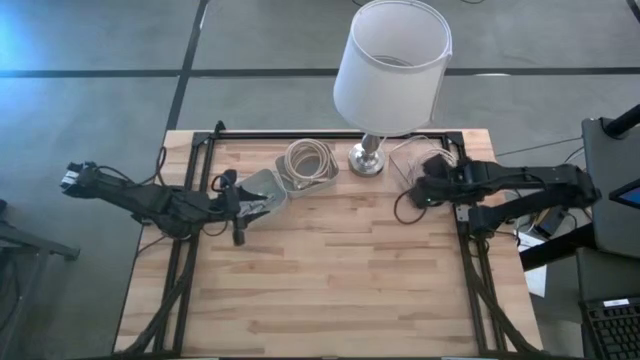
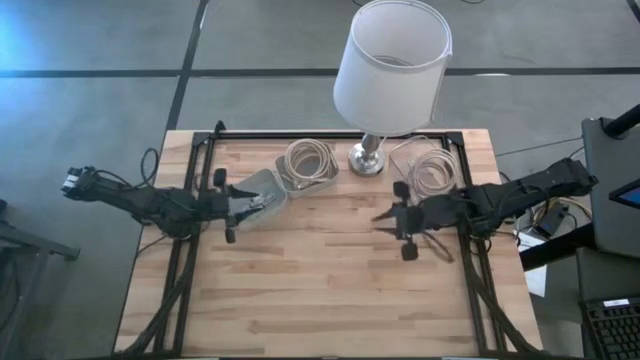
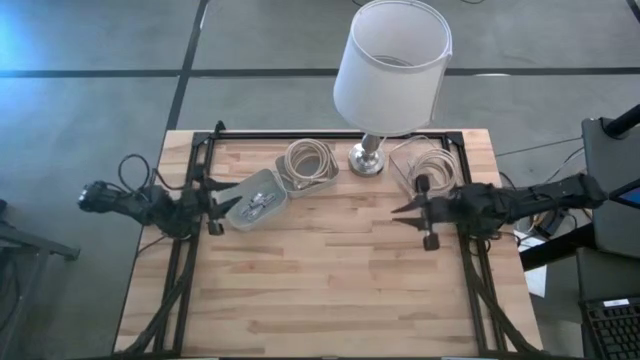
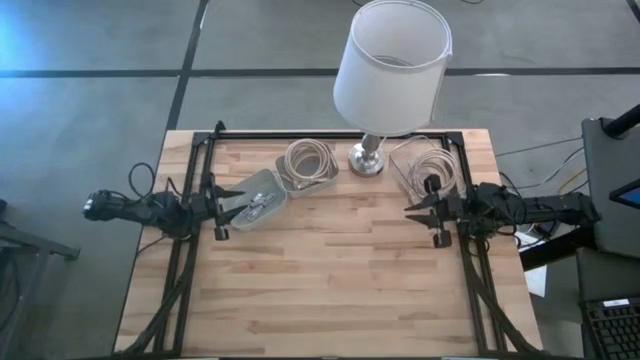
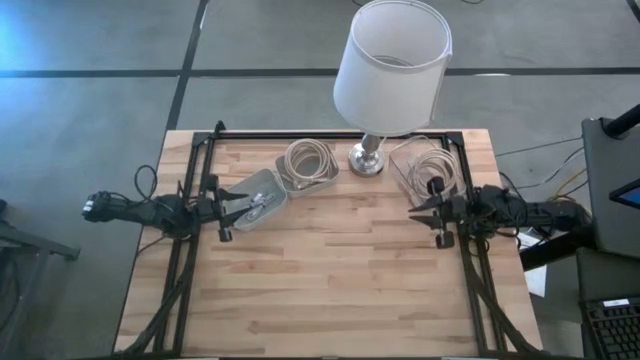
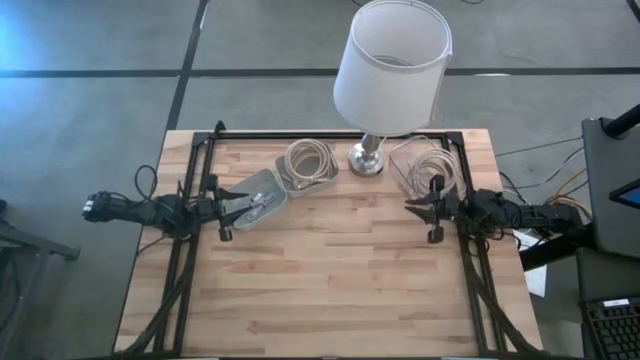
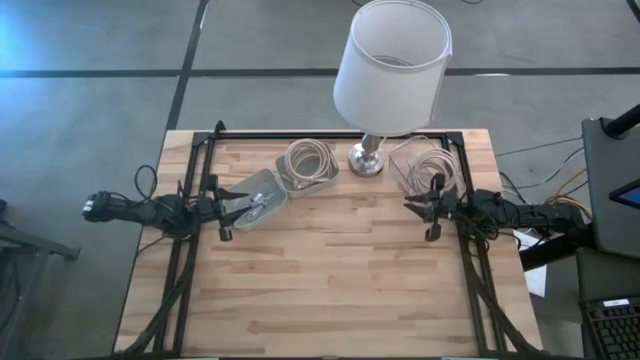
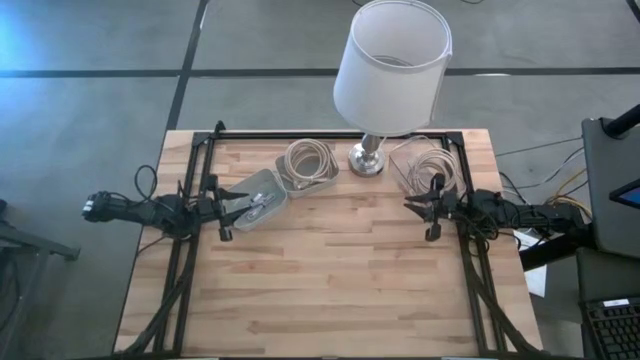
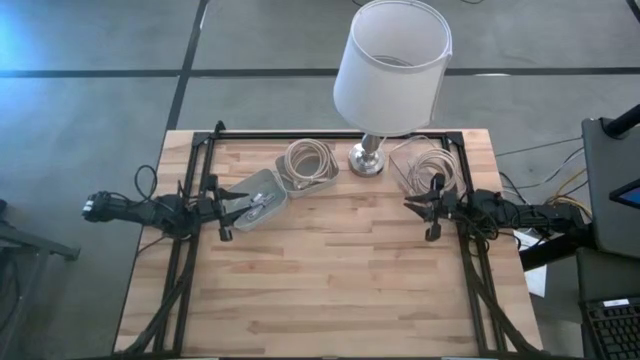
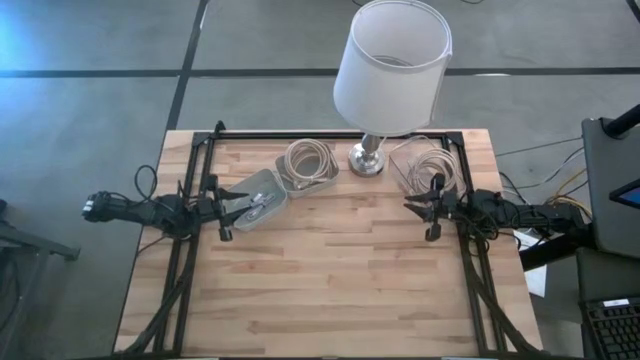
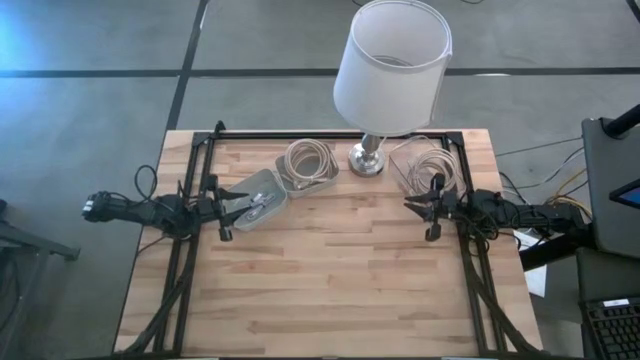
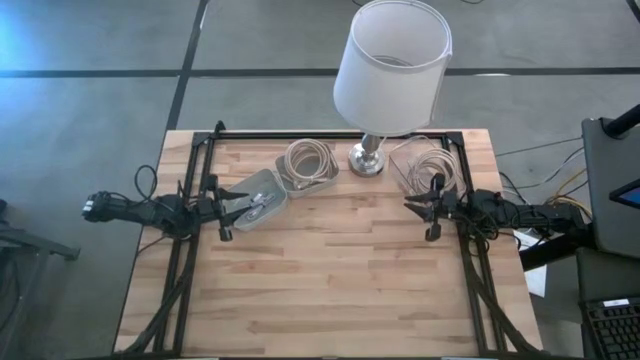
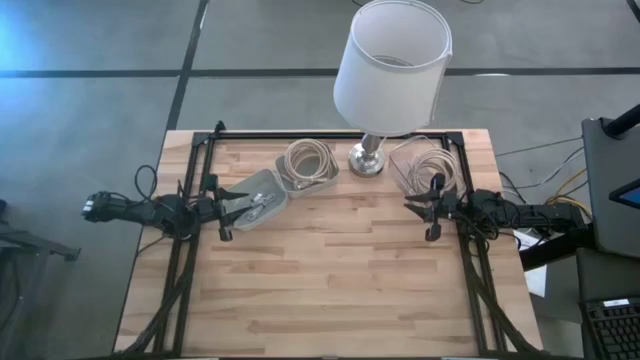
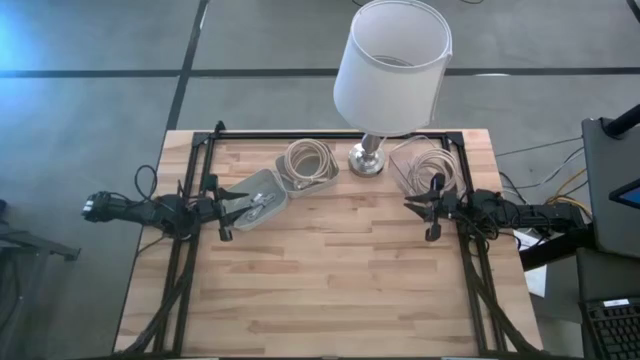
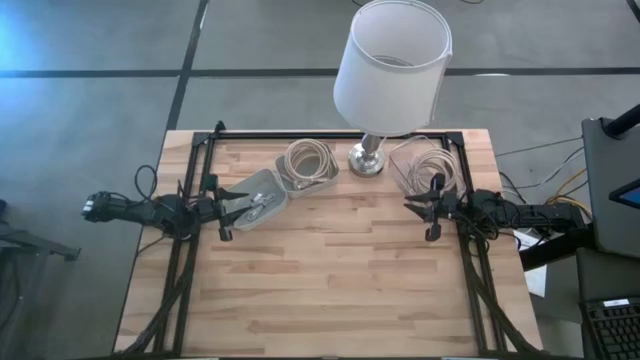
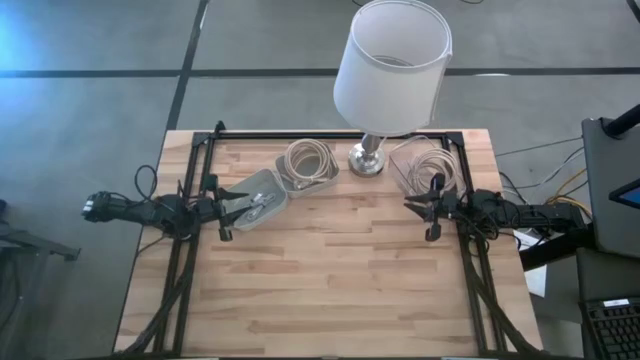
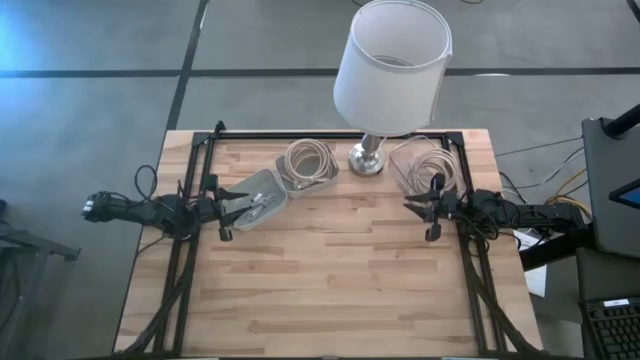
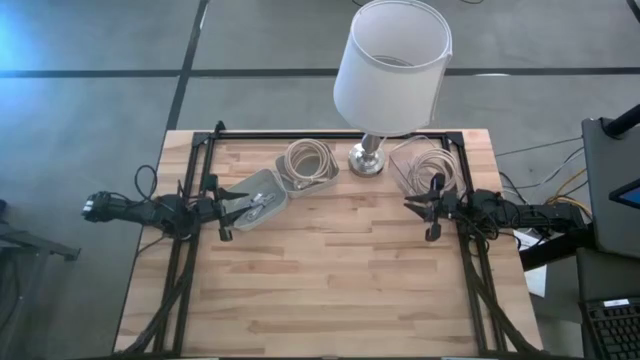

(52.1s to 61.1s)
Task: Pick & Place USB Port
Return to Home Position

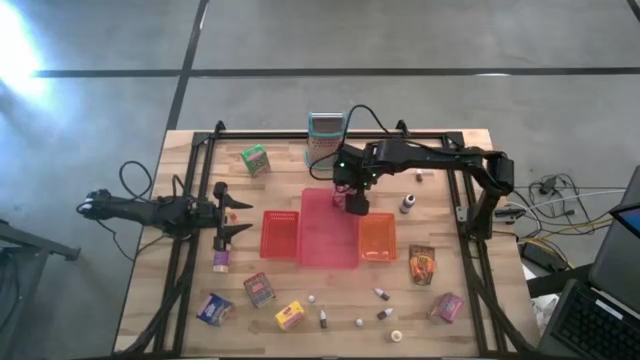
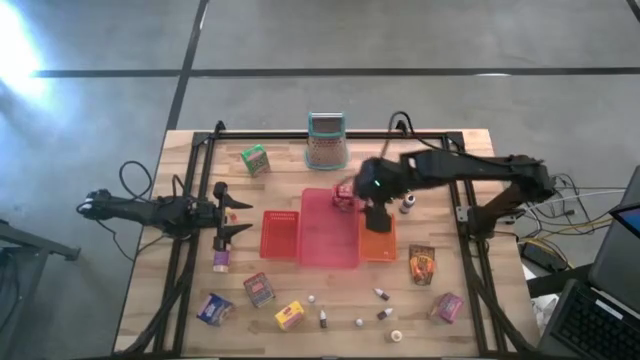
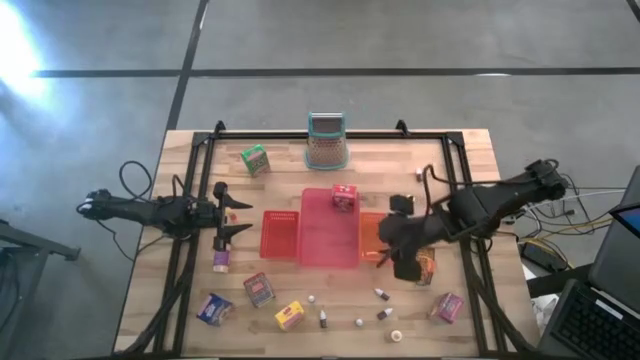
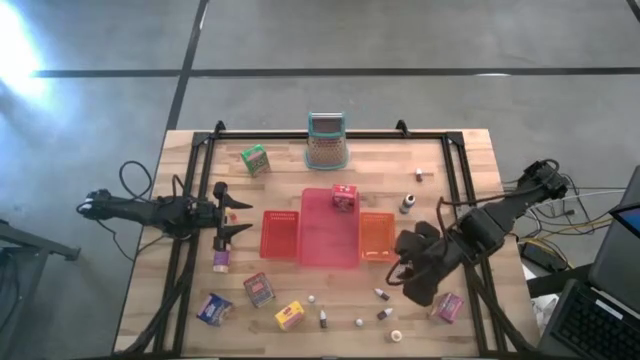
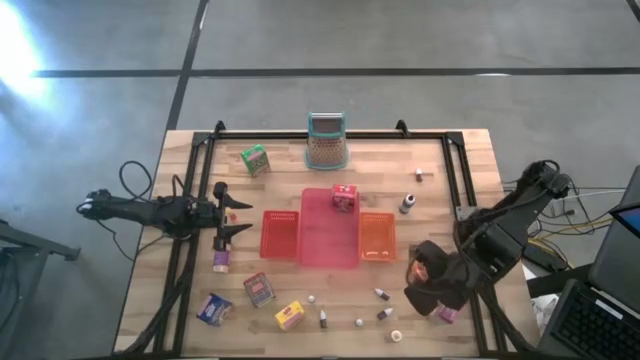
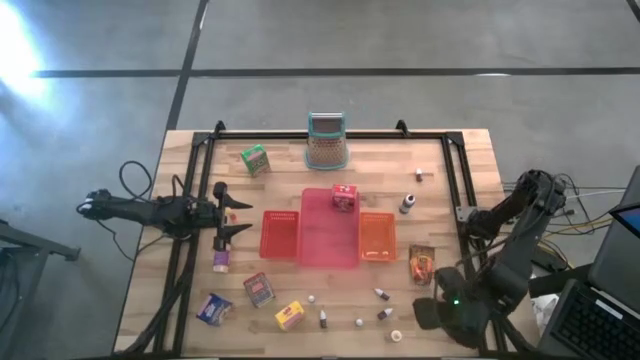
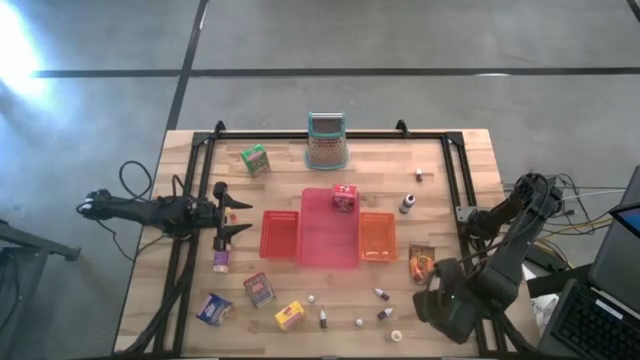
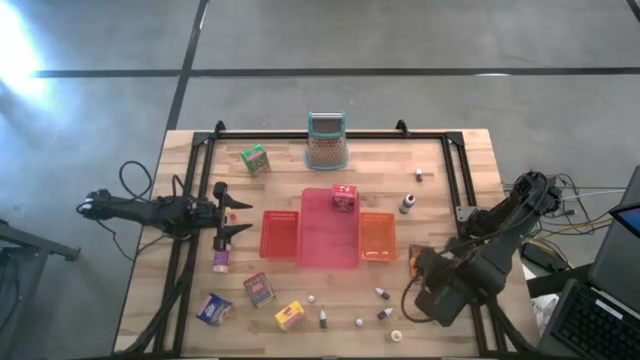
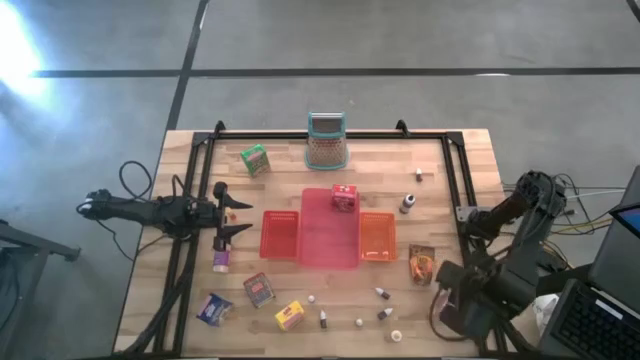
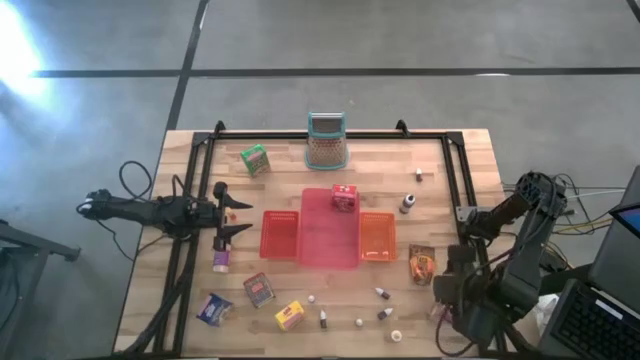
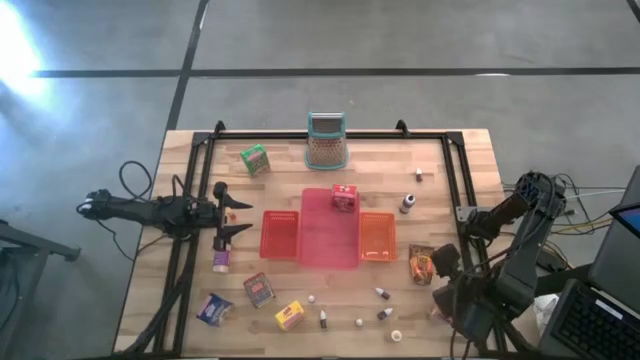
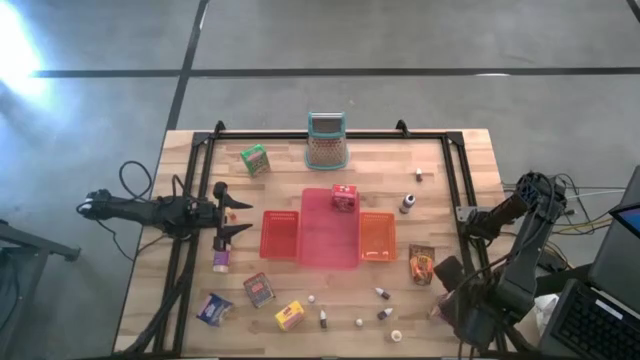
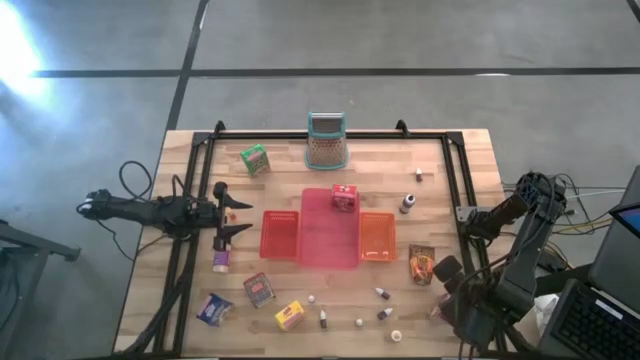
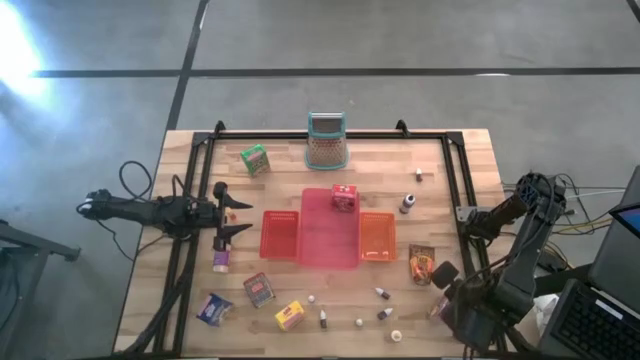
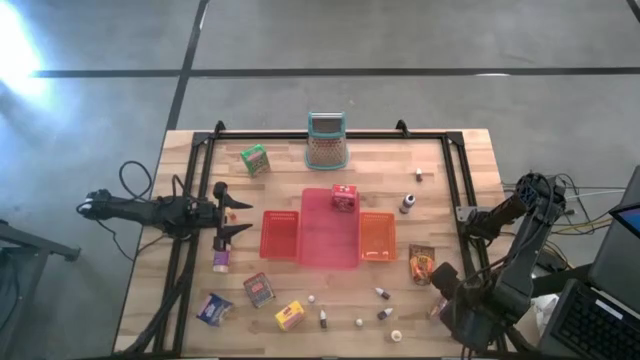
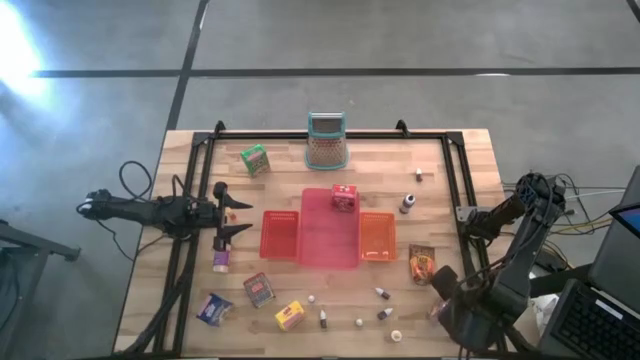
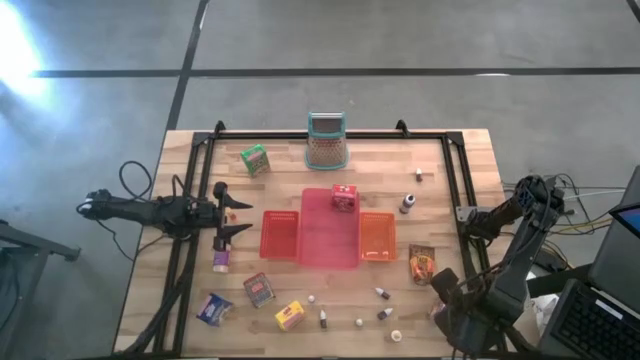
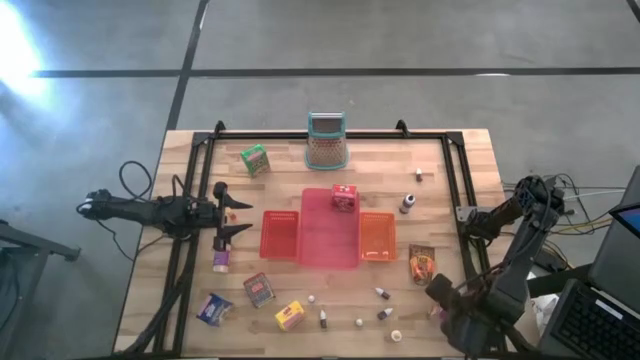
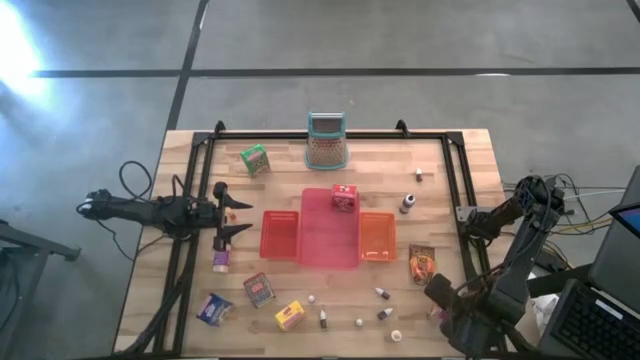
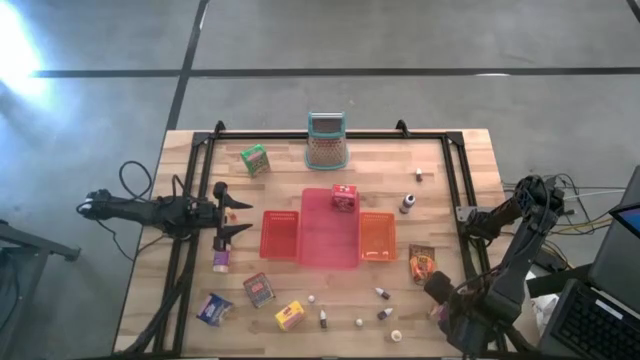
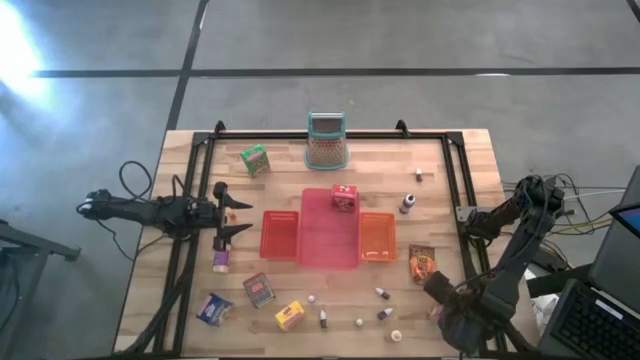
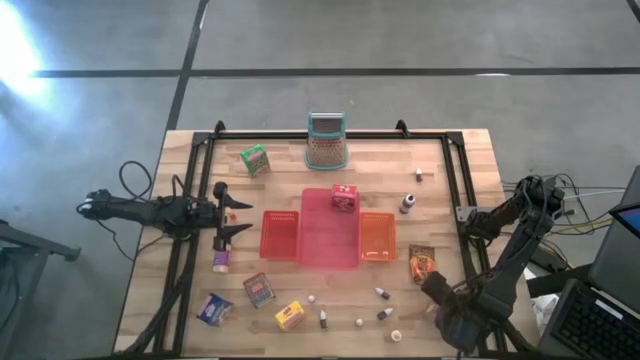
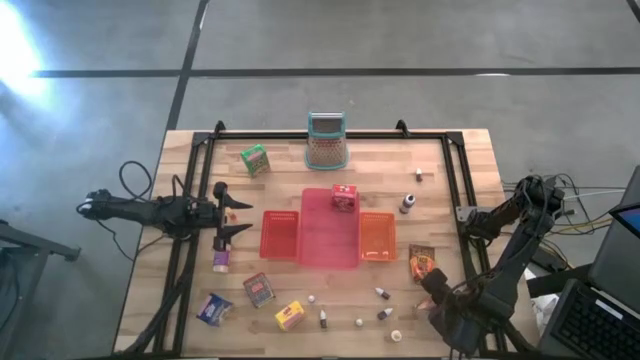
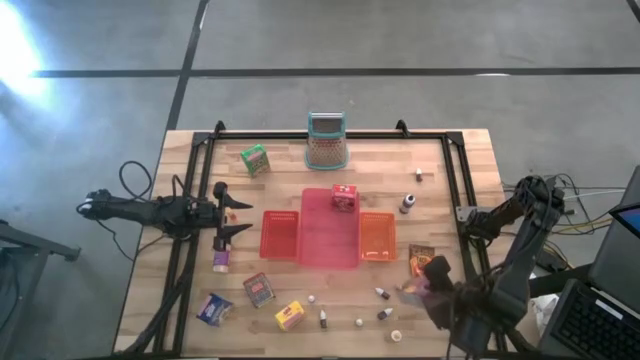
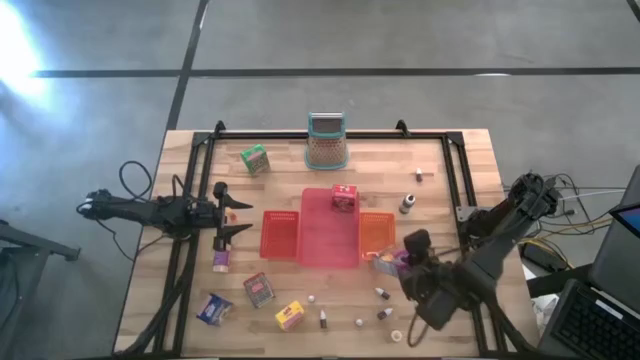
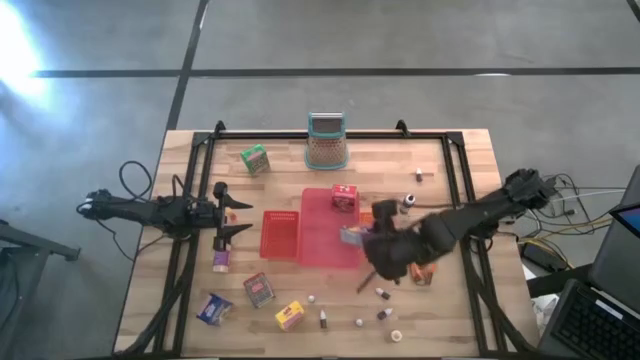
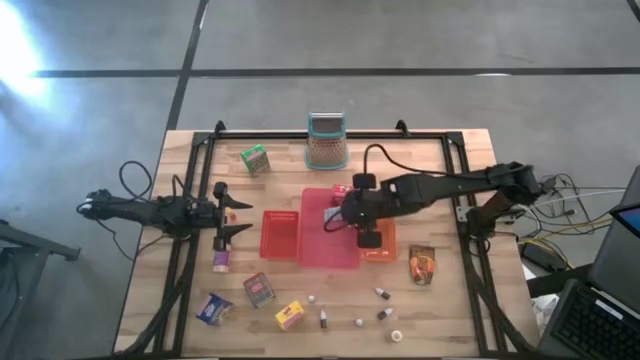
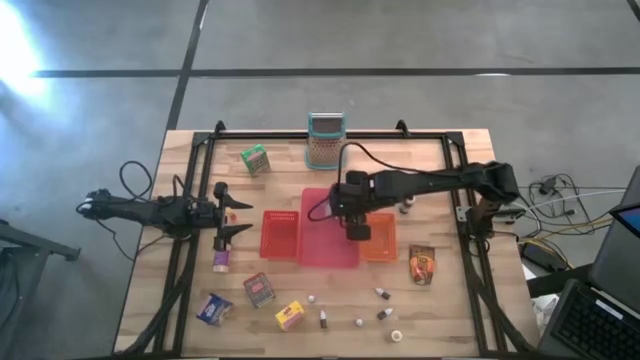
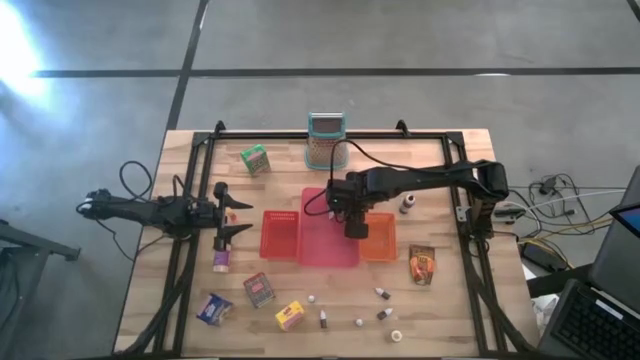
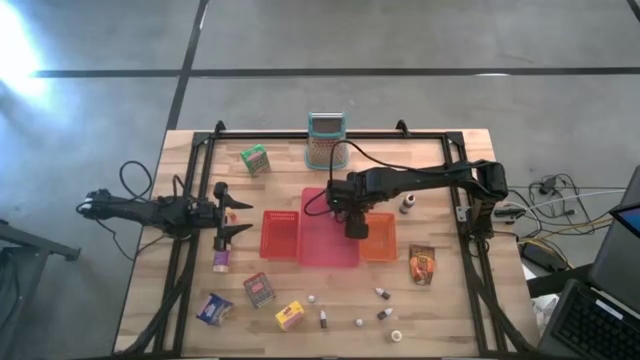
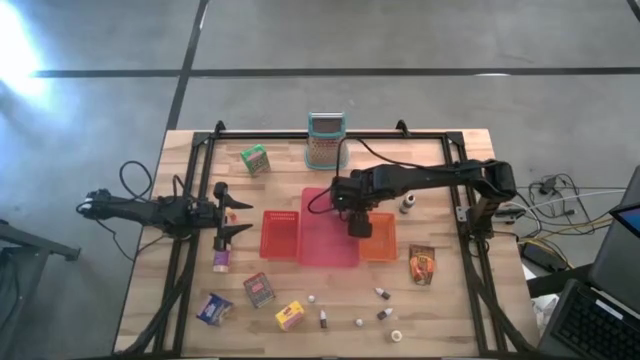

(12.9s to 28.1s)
Task: Pick & Place Kitchen Items
Put the purple cereal box into the pink bin
